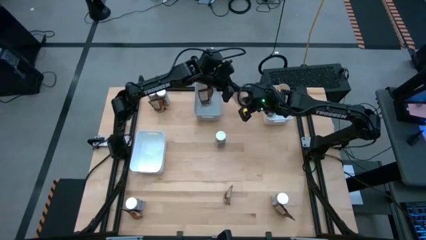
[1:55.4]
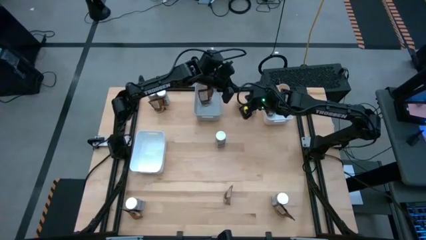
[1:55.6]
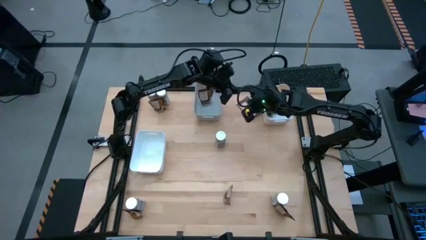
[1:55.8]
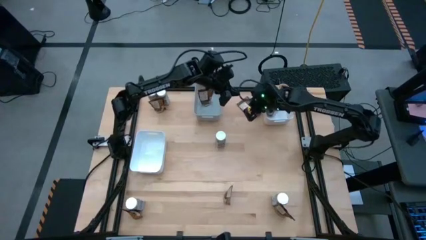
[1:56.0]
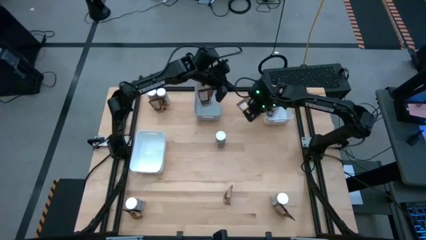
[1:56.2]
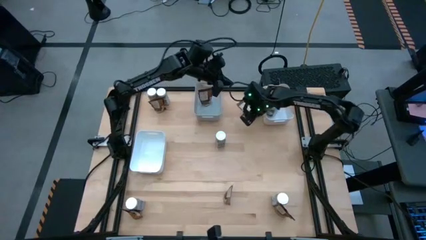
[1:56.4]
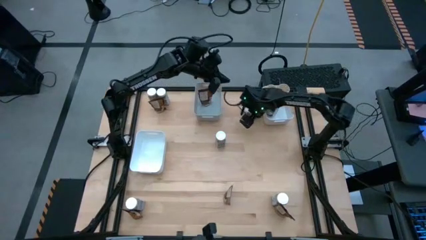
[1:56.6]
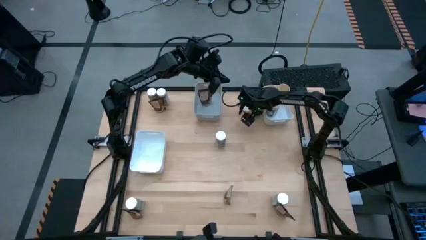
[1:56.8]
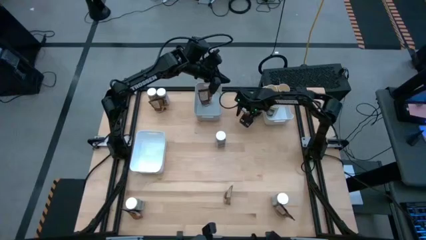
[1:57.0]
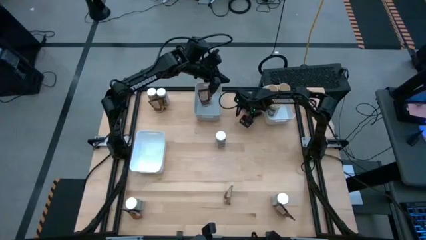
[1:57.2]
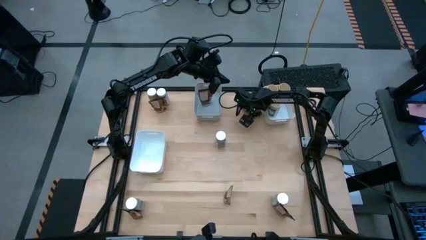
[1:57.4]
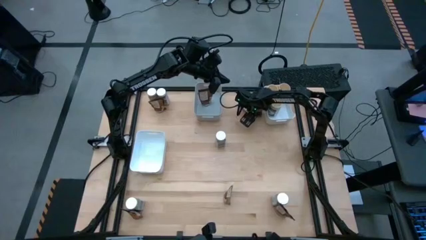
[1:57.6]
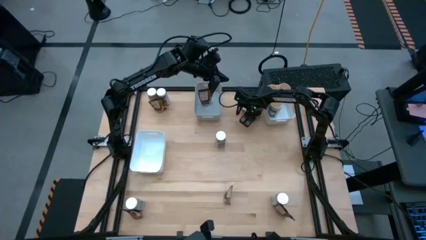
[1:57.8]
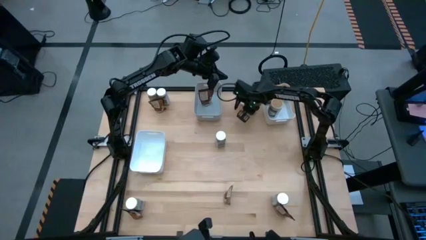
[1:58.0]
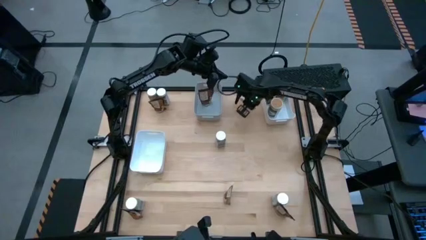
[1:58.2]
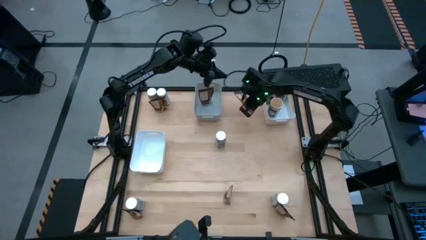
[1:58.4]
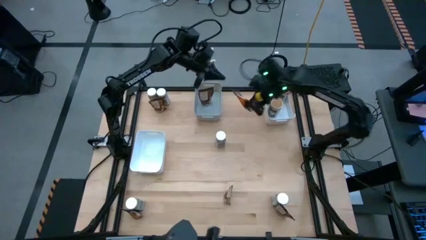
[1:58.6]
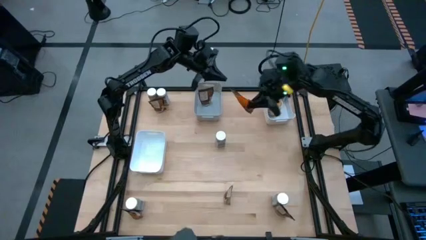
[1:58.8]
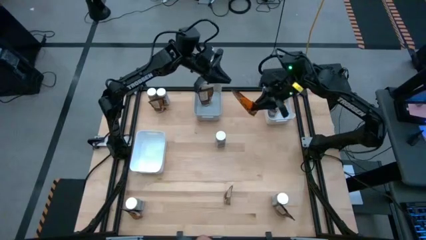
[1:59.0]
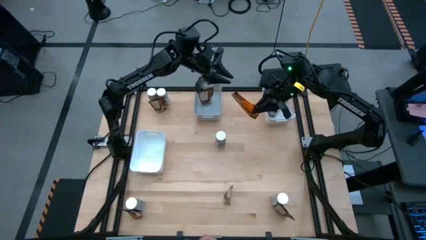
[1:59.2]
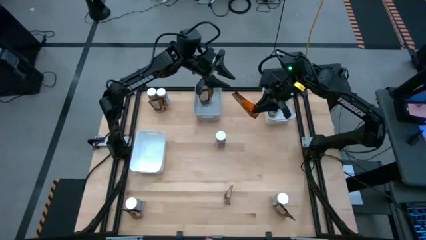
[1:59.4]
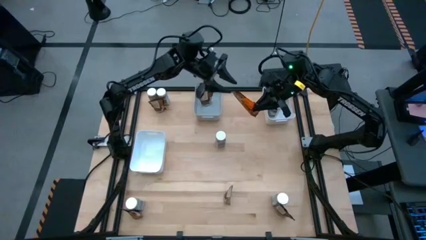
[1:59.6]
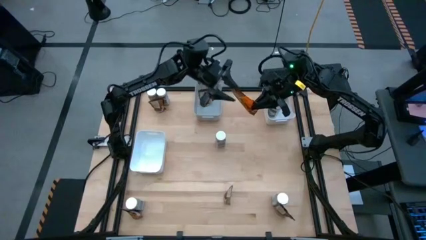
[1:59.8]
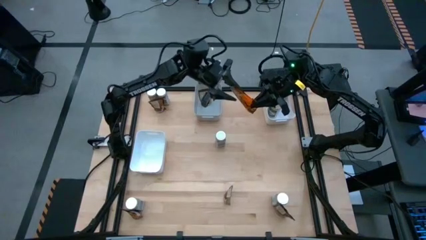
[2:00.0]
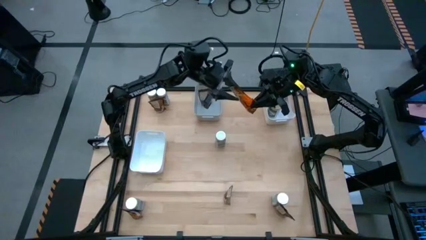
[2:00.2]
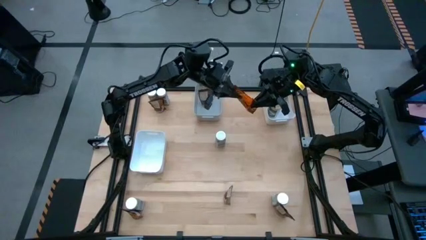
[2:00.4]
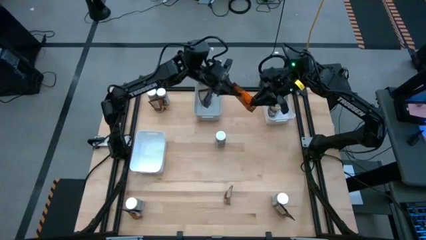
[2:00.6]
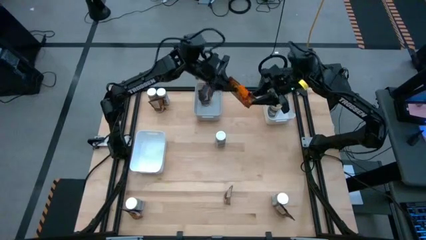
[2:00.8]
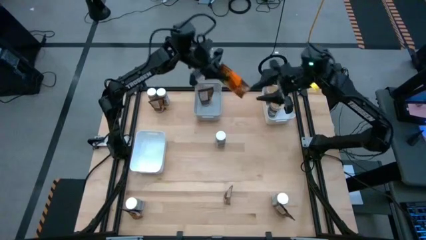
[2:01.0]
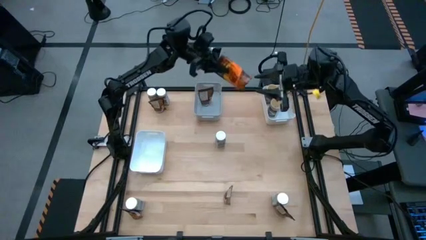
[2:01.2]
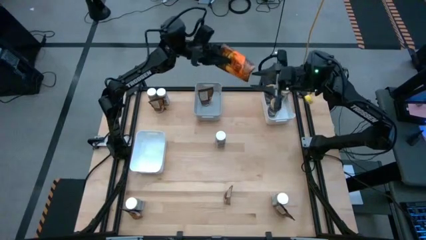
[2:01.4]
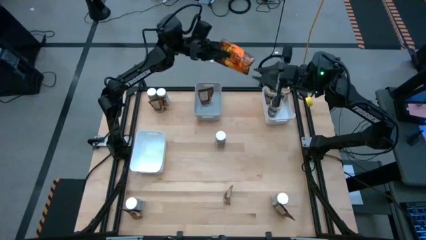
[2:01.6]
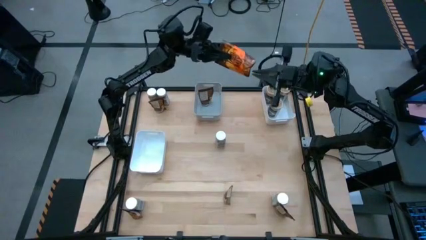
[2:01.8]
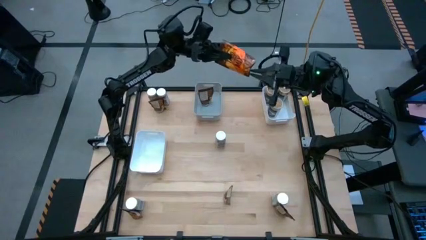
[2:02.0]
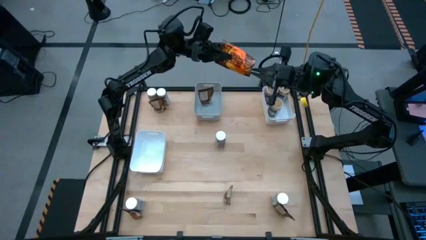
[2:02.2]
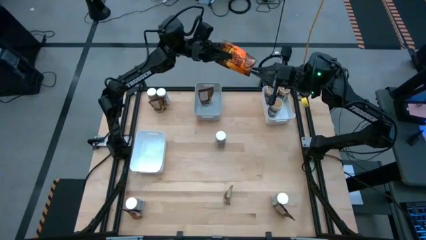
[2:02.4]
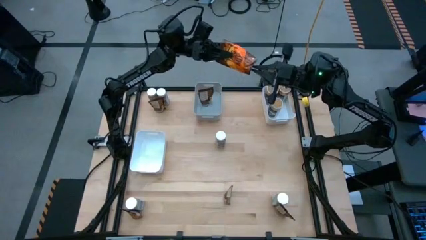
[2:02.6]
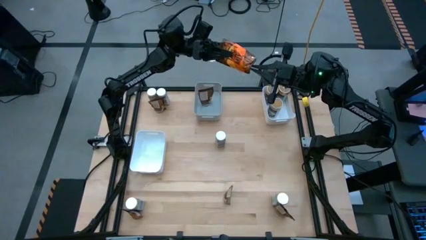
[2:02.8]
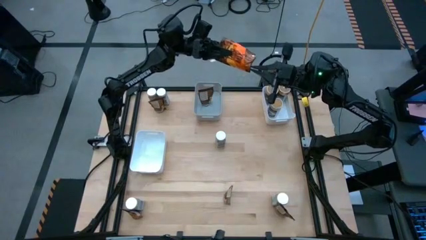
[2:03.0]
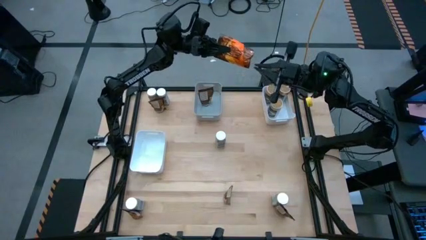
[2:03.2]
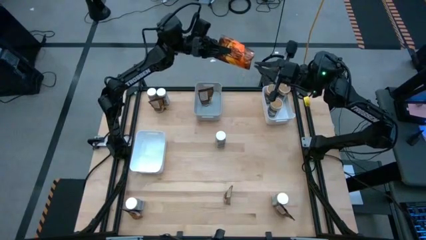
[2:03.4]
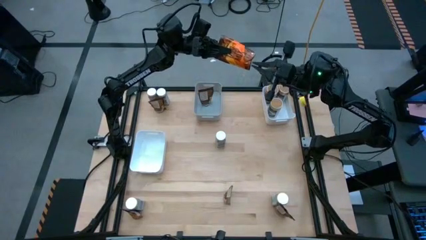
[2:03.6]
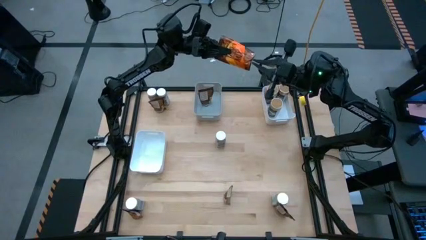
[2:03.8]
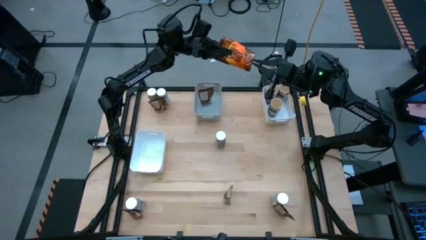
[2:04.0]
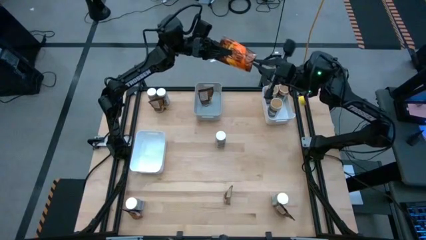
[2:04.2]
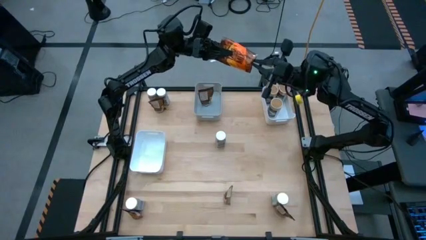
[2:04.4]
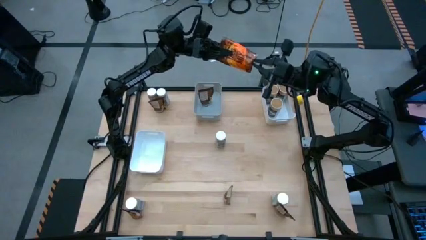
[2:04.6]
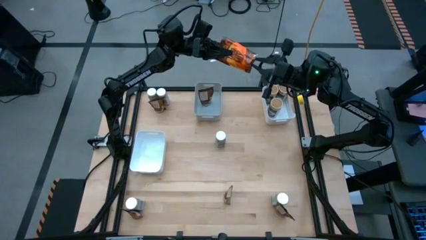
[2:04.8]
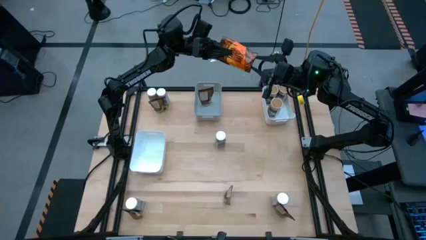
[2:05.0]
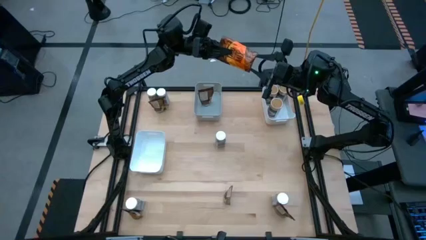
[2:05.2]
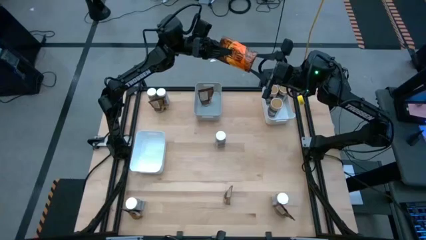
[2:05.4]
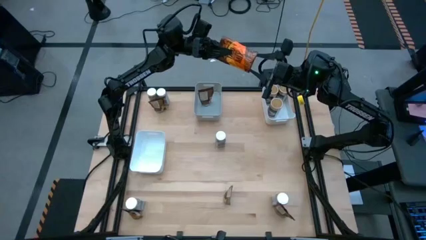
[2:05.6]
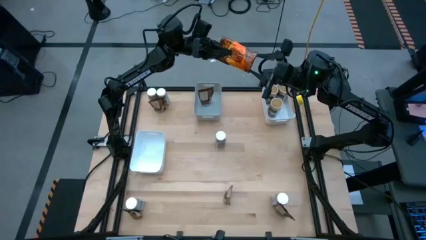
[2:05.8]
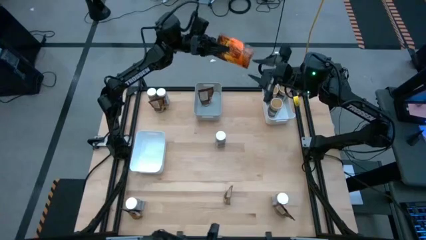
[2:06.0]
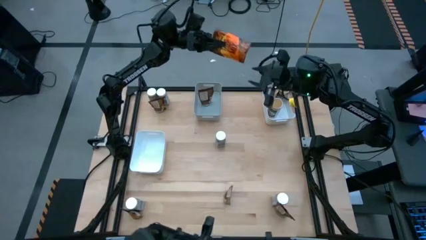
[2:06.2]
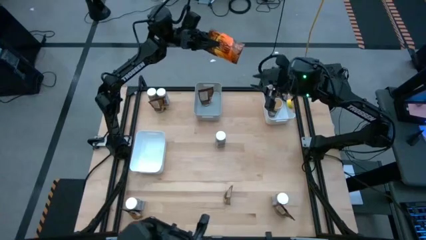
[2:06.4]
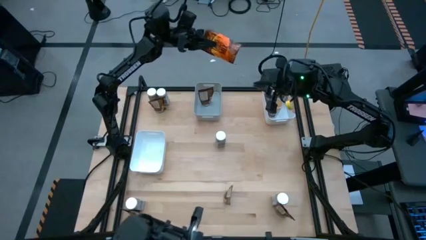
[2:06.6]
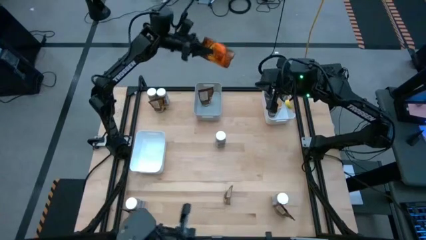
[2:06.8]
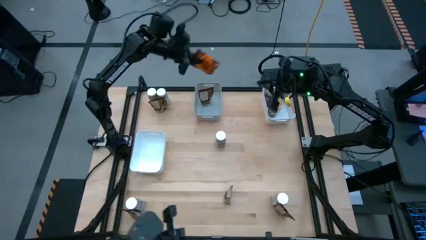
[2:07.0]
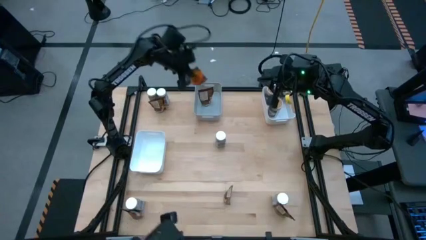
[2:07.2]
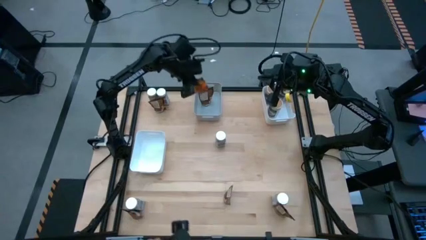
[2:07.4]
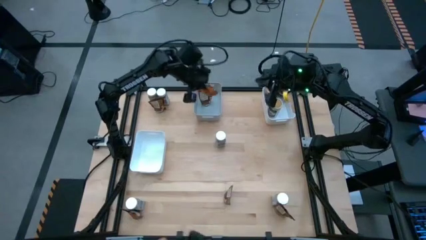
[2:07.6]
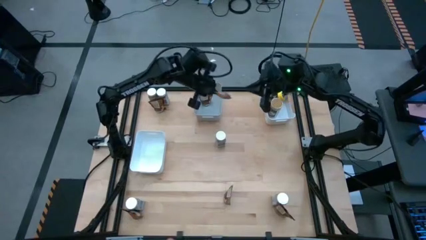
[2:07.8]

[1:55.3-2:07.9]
Task: Sort spices by type
Adjust the orange spice pack
